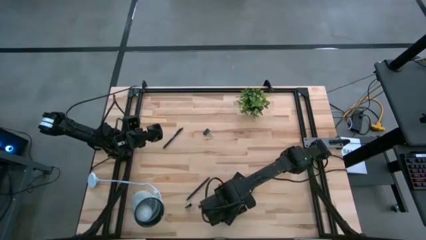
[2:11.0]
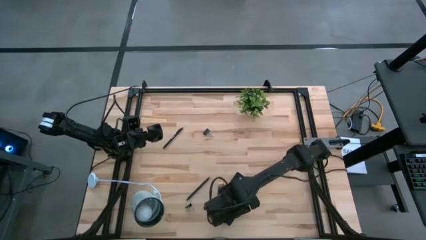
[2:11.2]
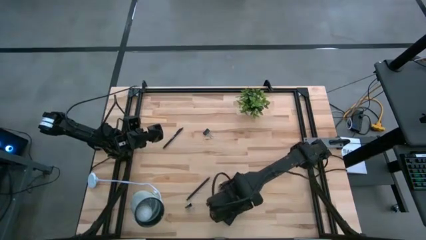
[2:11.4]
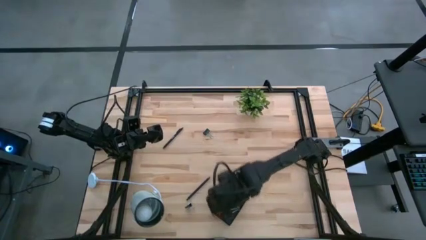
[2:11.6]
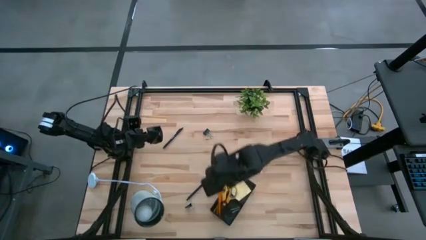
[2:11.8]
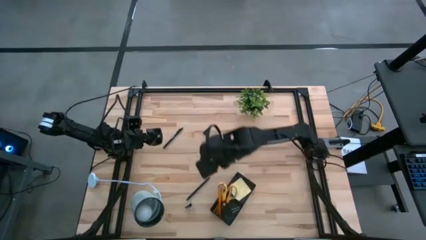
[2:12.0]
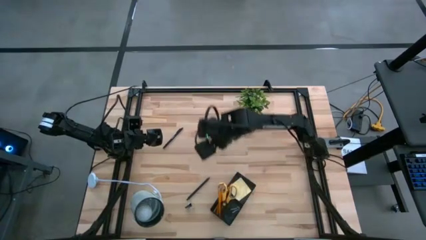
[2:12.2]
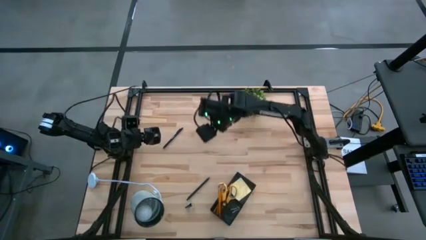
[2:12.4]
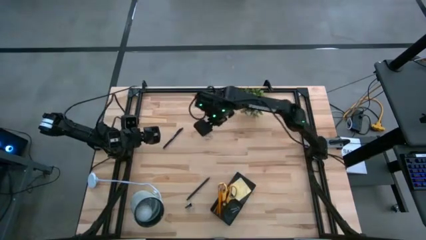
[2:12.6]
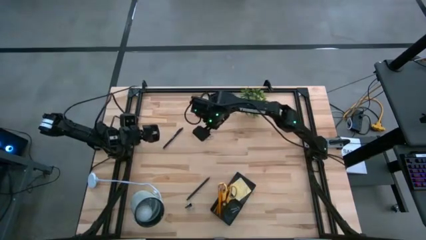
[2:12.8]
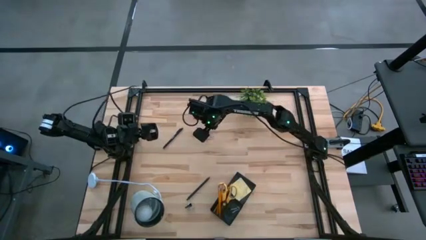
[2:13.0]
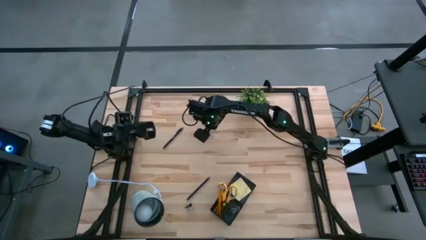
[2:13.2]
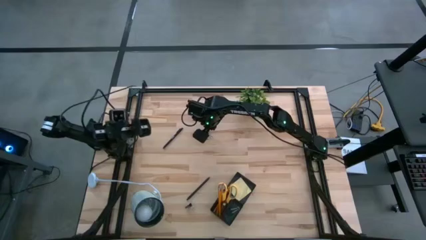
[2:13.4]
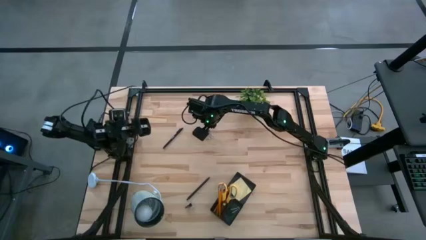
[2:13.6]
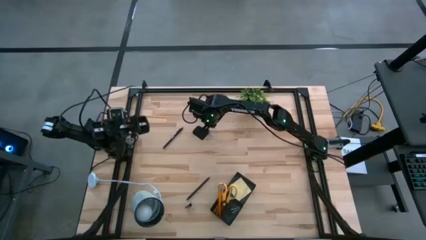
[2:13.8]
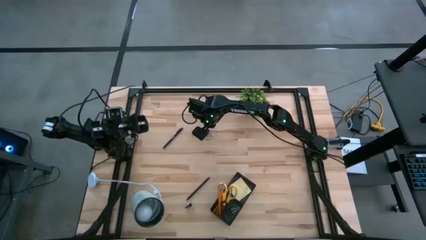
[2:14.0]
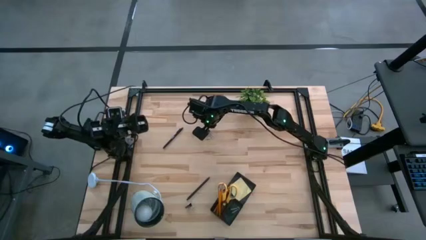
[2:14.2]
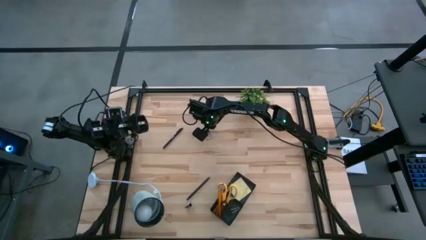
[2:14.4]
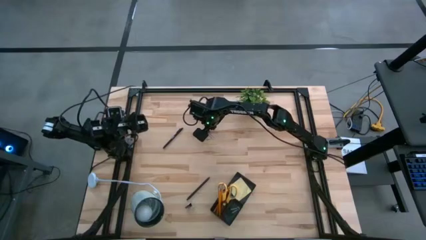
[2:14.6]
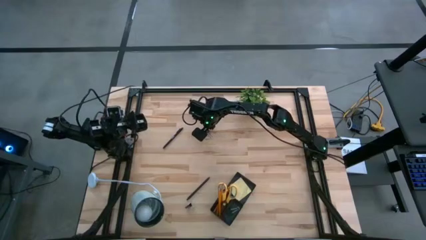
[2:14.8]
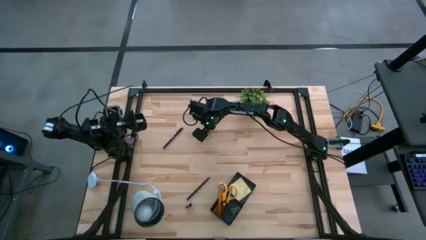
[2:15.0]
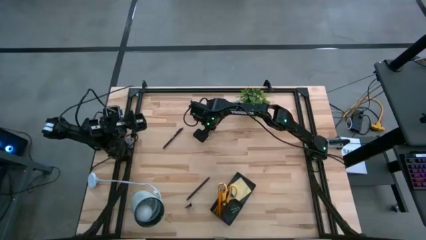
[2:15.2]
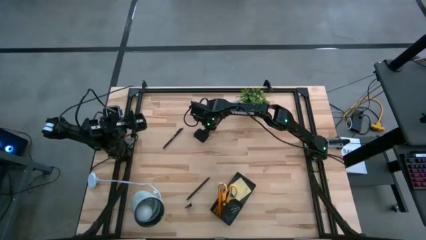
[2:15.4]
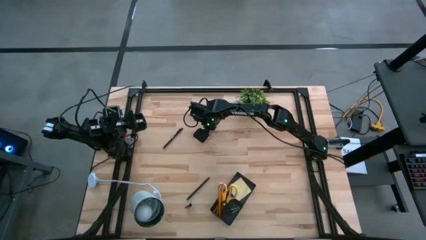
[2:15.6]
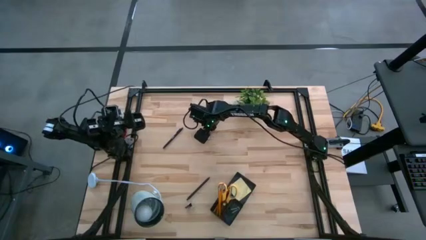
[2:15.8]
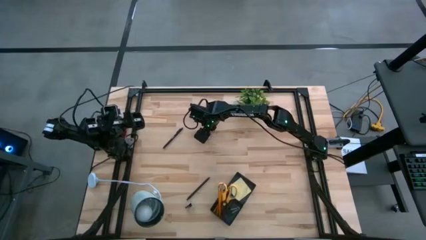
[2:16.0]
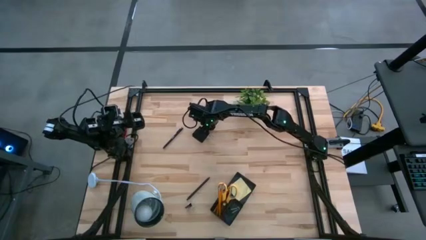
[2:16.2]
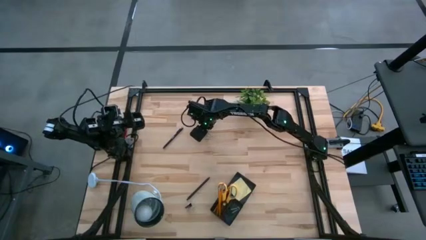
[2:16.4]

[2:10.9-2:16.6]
Task: Pick and place office supplies into organizer
Put the top binder clip into the desk organizer

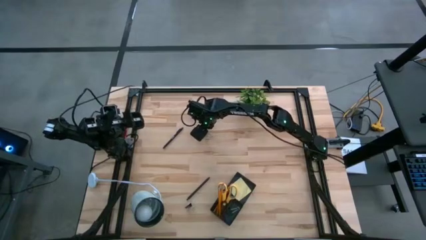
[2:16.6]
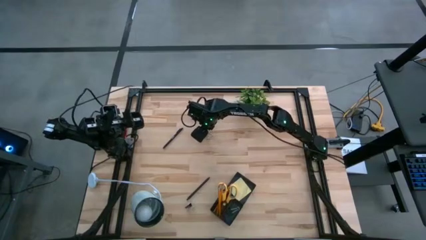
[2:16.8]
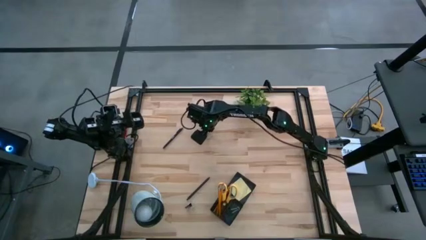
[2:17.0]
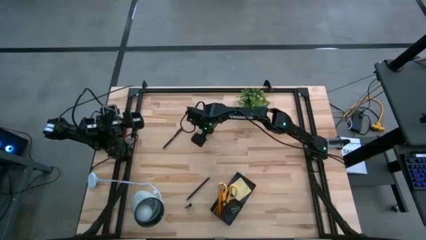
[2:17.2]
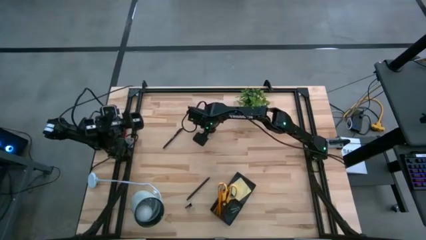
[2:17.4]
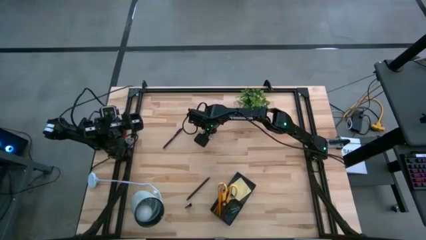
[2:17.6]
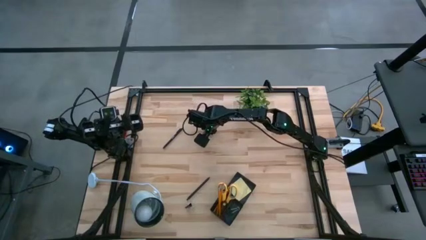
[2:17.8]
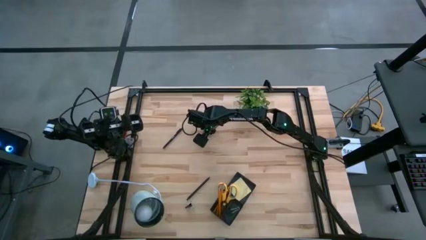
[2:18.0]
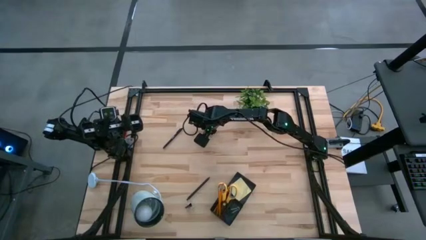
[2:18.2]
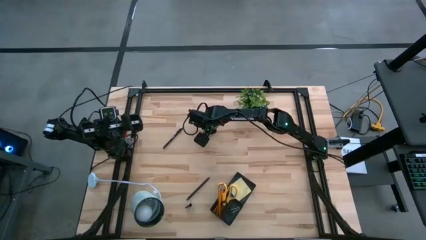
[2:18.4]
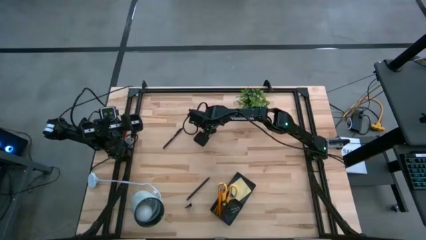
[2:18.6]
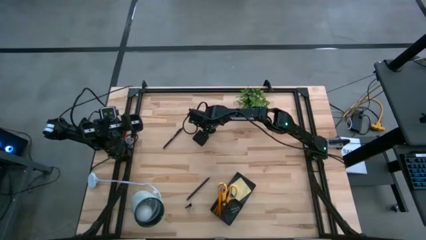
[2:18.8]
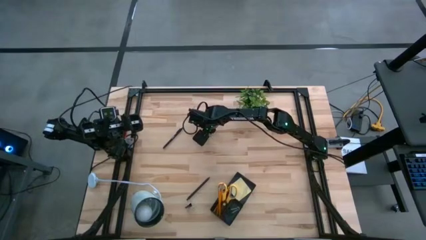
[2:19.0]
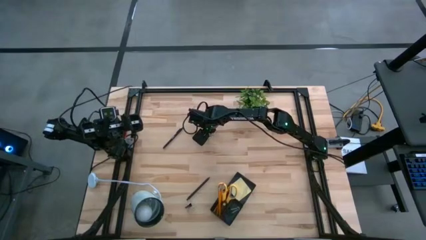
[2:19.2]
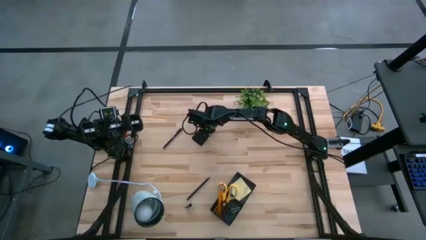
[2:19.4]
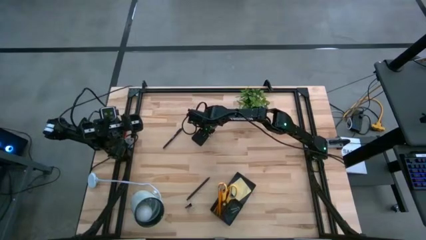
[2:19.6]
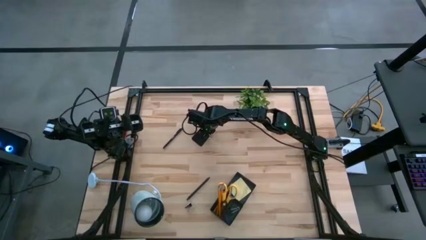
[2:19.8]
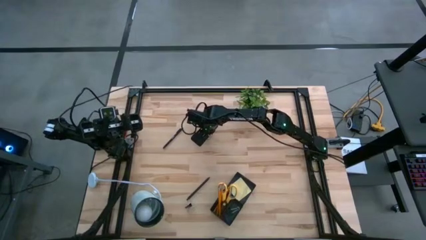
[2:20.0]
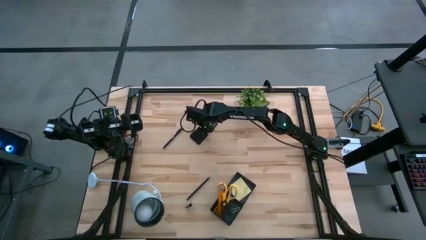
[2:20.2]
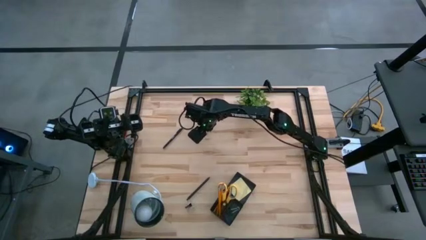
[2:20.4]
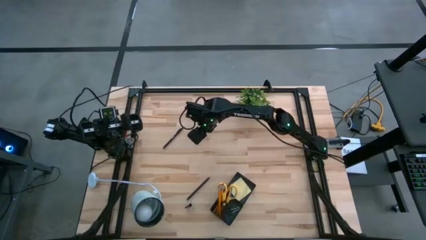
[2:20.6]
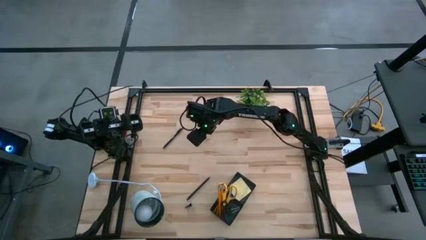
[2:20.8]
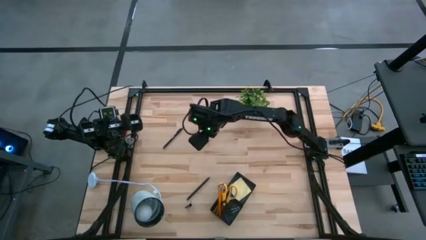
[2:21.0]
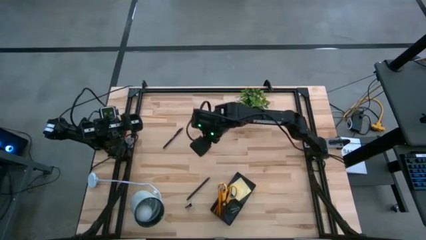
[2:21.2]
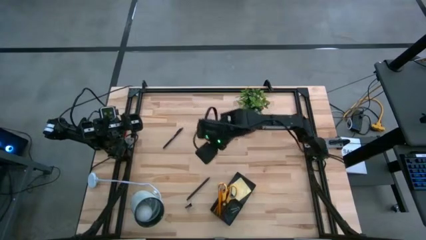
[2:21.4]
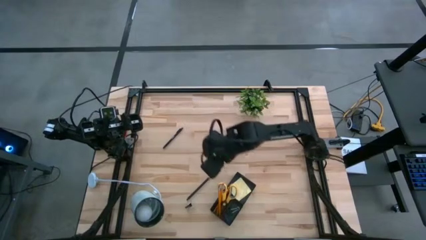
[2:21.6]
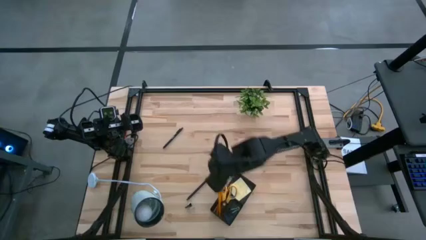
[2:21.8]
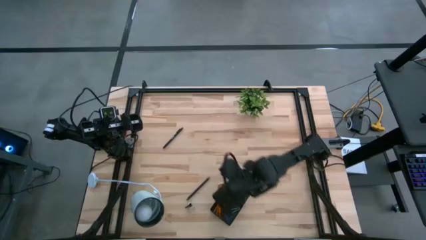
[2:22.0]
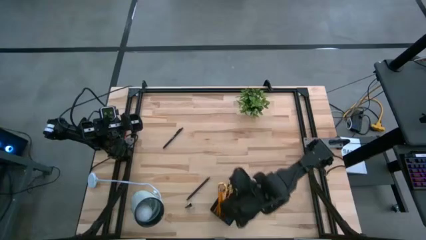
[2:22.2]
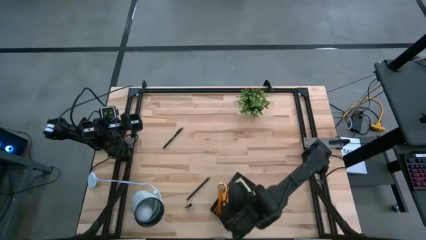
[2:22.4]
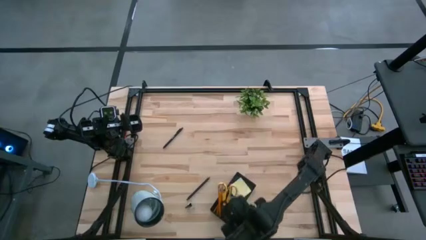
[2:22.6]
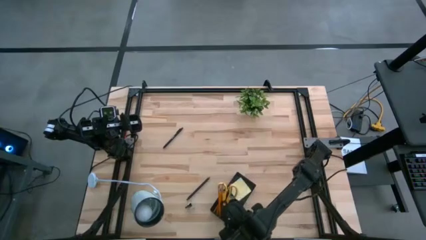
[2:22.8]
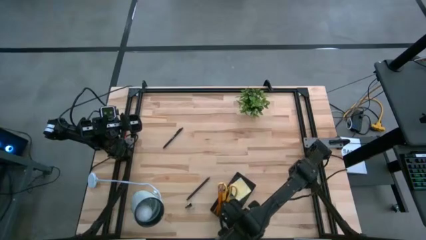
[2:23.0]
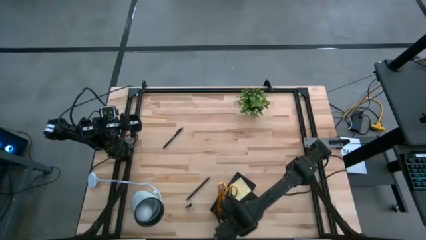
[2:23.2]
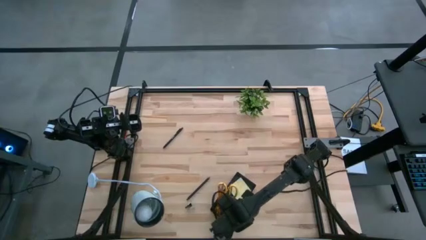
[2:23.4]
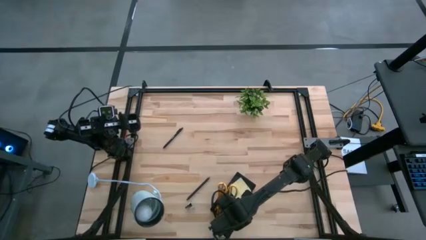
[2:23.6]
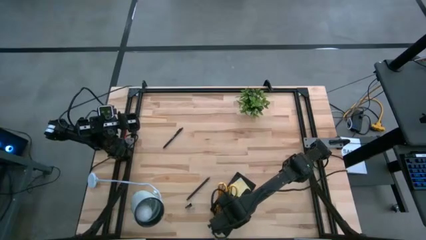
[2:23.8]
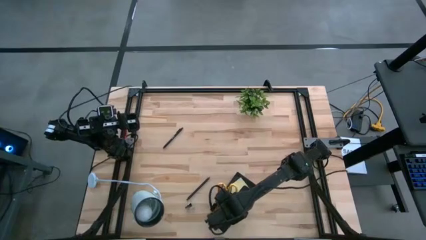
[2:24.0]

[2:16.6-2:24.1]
Put the top binder clip into the desk organizer

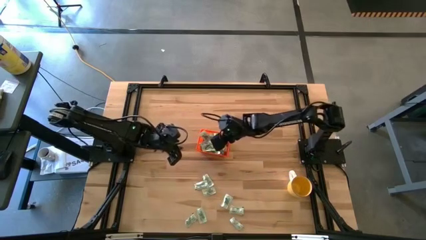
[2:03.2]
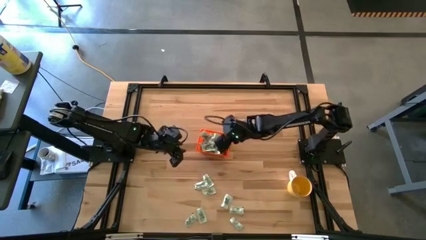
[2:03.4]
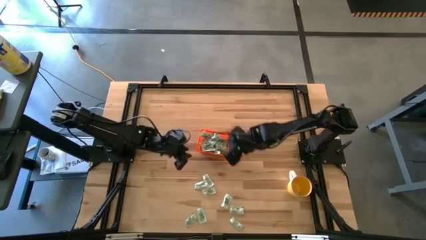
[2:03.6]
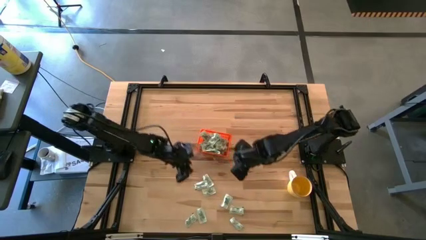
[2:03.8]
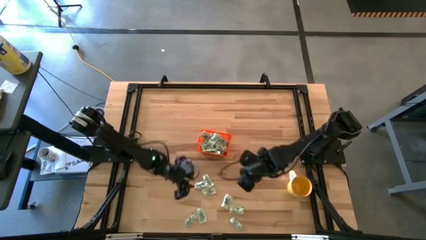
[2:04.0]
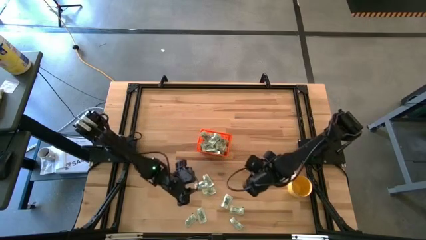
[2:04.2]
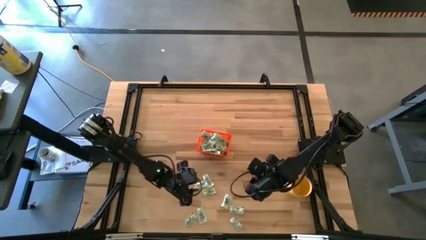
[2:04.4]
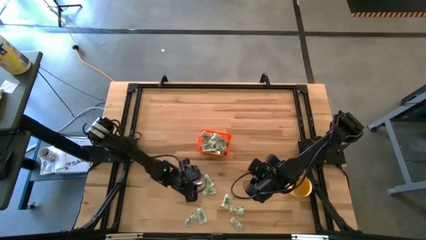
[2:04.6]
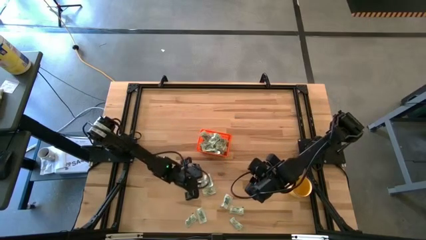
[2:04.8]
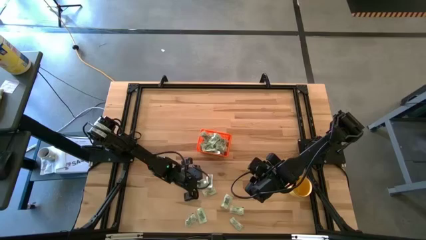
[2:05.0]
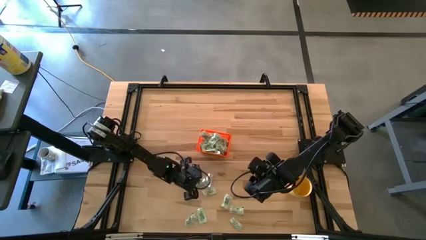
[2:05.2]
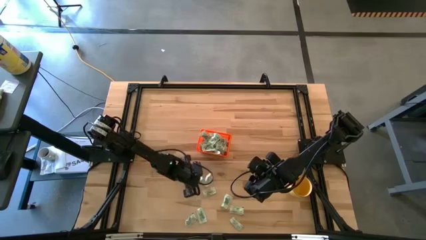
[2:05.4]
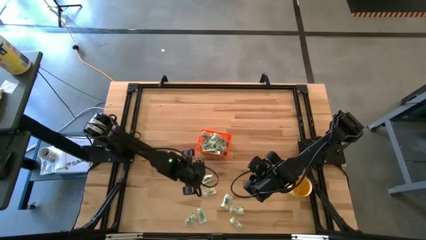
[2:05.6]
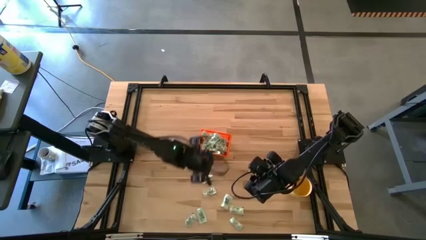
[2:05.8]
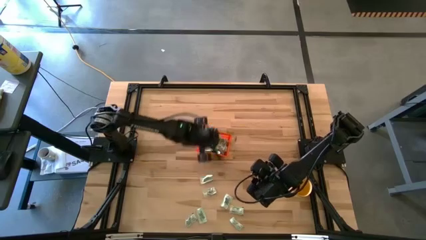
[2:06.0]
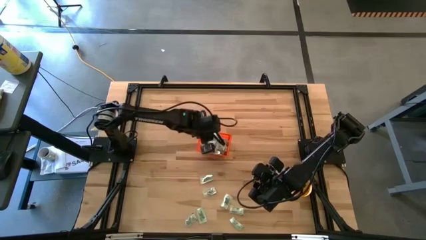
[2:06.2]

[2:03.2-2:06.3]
Task: Pick and place Stevia / Truvia into bins
Put the light green stevia packet into the orange bin

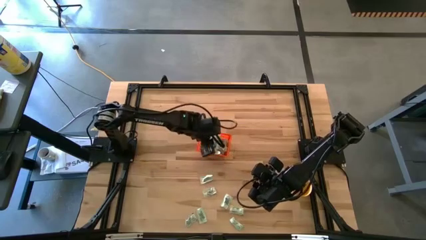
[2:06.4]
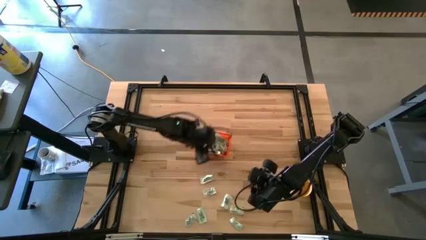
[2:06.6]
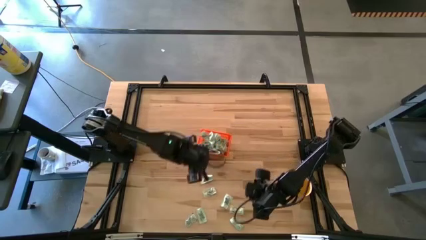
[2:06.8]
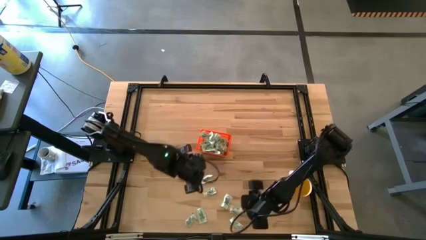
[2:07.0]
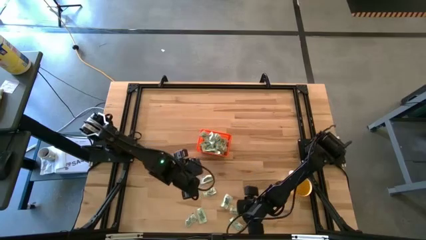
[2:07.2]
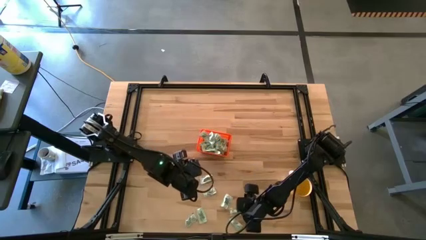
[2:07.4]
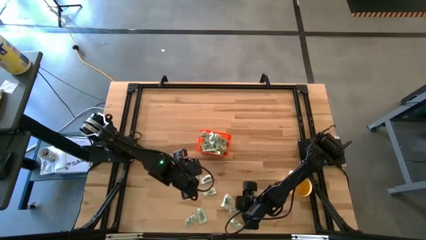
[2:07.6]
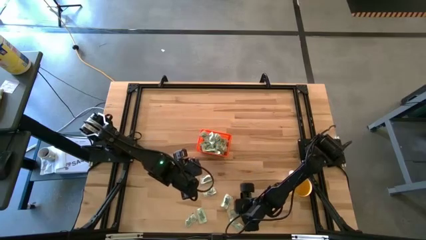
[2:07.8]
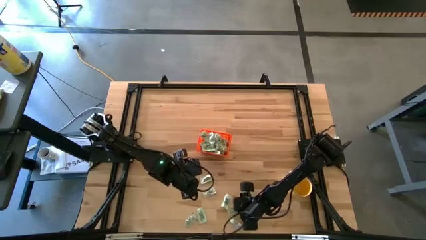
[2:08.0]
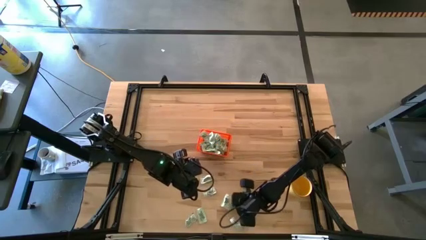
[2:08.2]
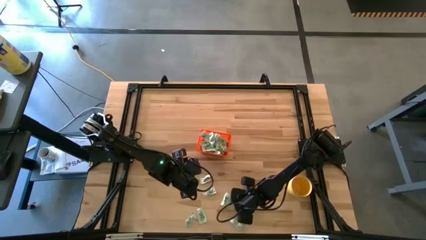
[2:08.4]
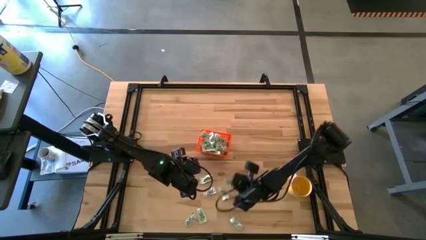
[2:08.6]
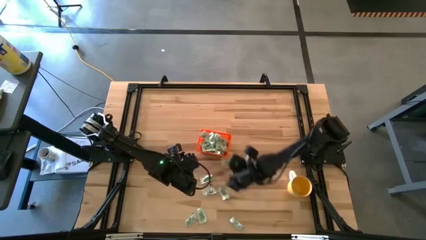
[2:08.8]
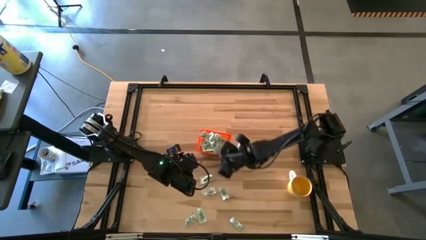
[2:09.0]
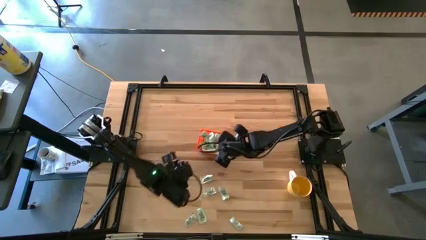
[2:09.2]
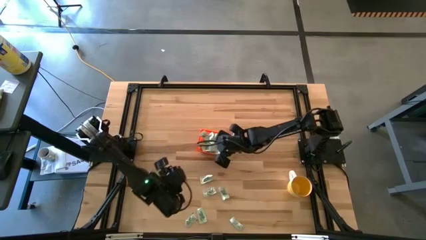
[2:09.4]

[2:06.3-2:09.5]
Put the light green stevia packet into the orange bin
